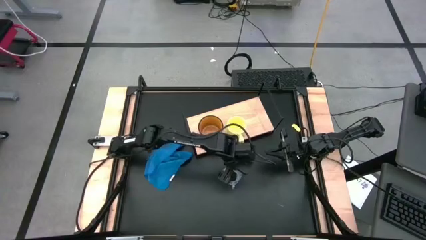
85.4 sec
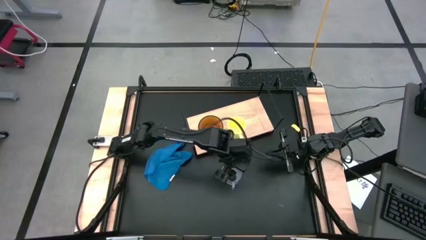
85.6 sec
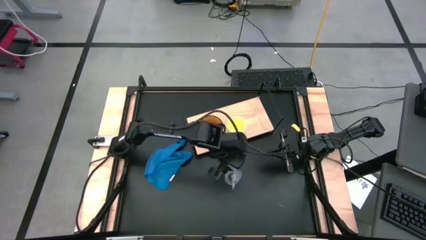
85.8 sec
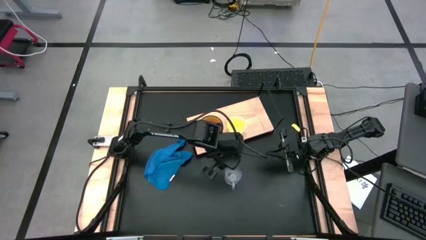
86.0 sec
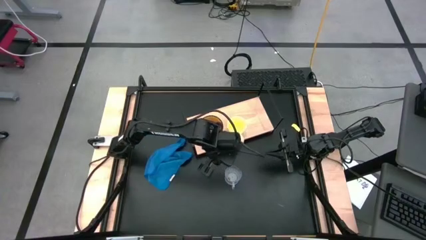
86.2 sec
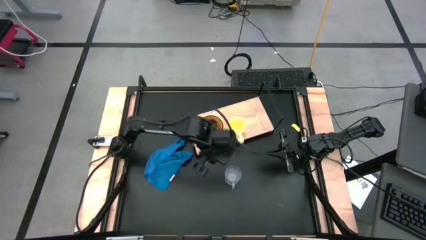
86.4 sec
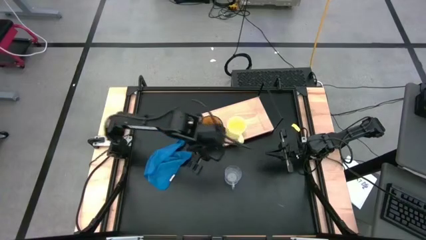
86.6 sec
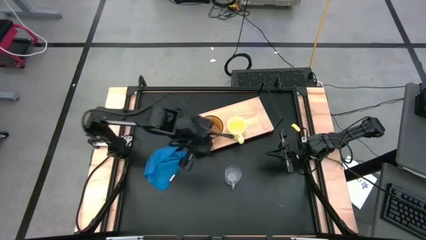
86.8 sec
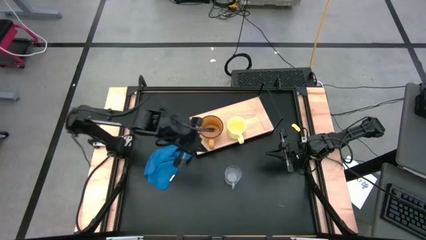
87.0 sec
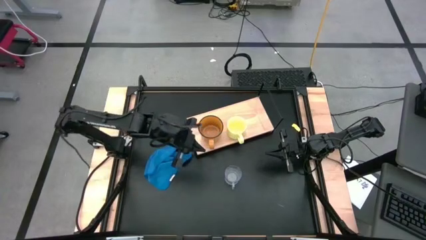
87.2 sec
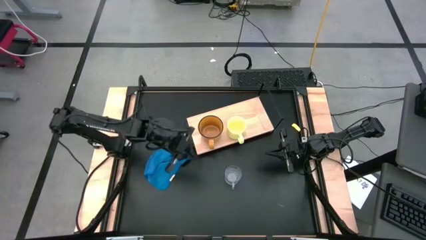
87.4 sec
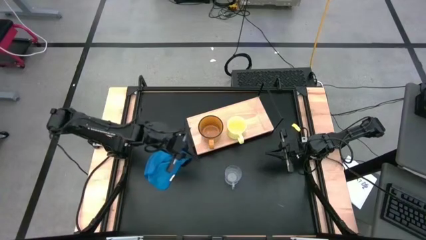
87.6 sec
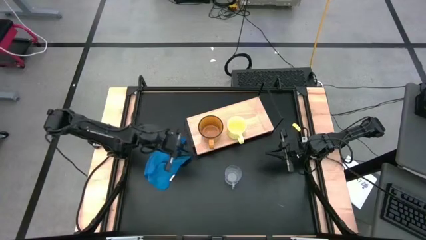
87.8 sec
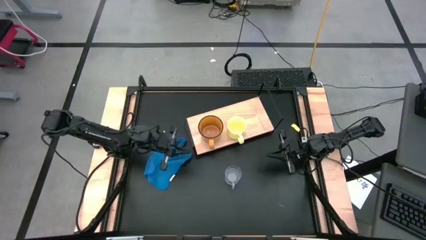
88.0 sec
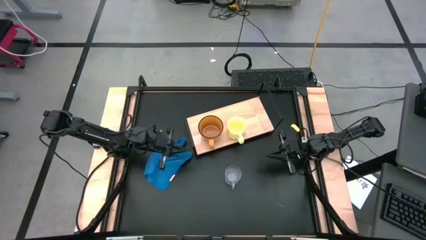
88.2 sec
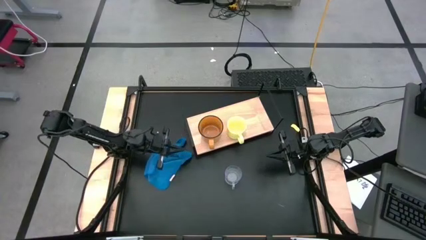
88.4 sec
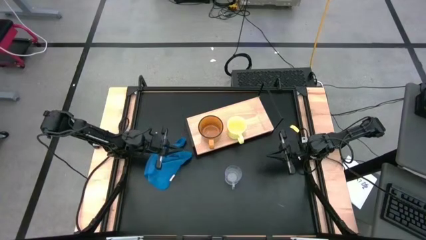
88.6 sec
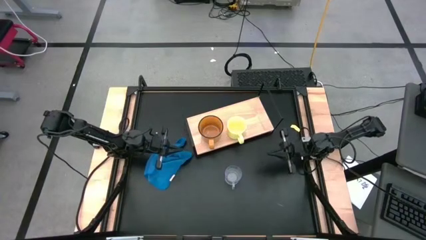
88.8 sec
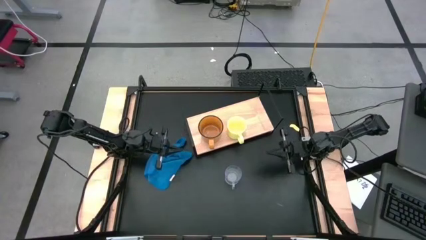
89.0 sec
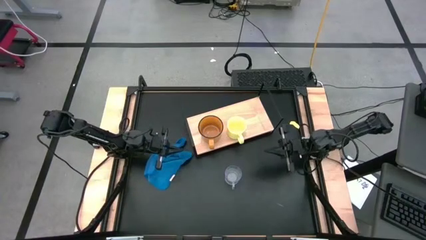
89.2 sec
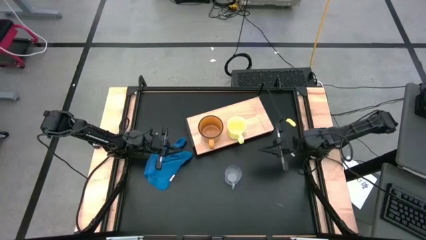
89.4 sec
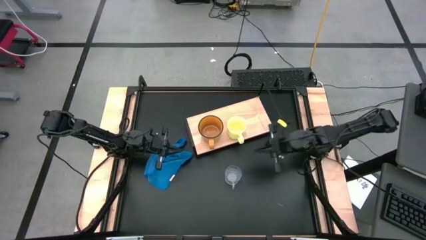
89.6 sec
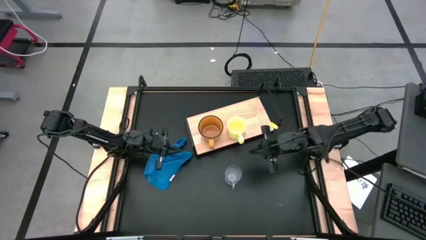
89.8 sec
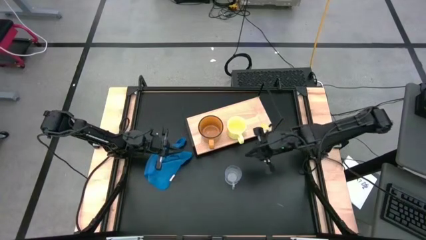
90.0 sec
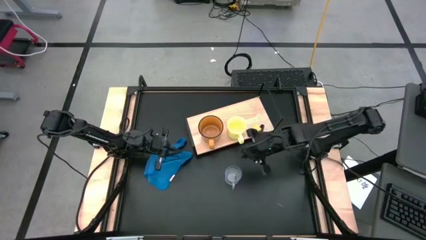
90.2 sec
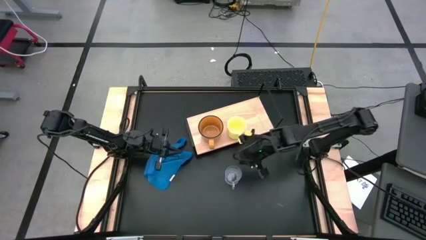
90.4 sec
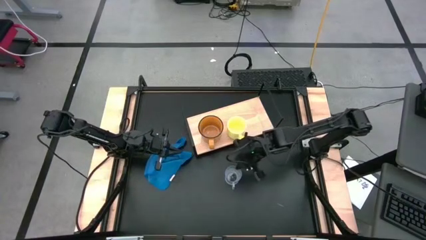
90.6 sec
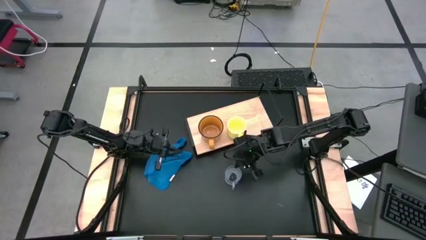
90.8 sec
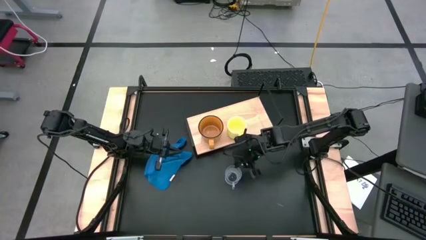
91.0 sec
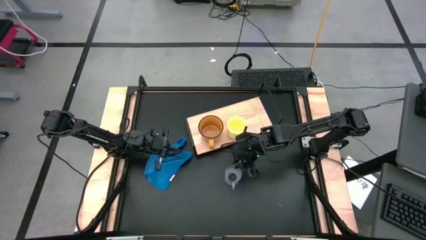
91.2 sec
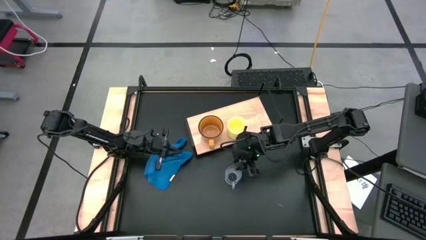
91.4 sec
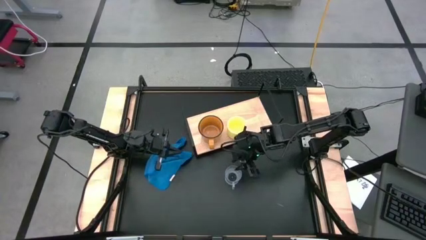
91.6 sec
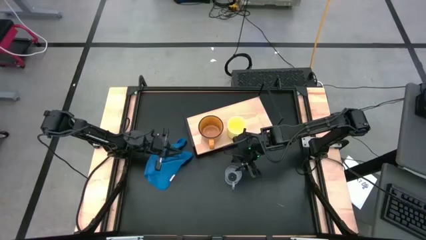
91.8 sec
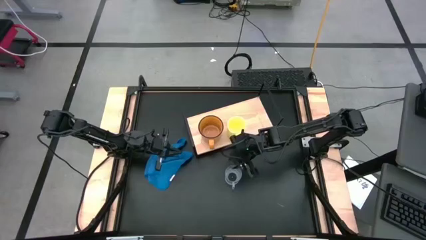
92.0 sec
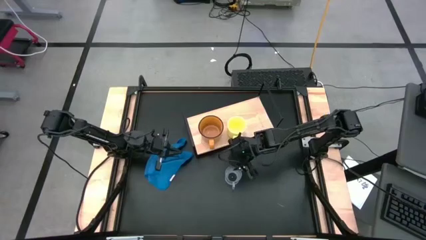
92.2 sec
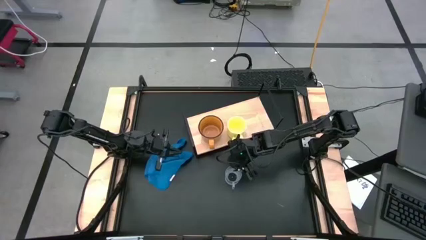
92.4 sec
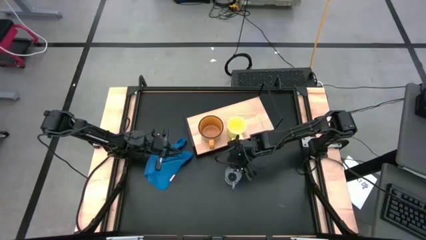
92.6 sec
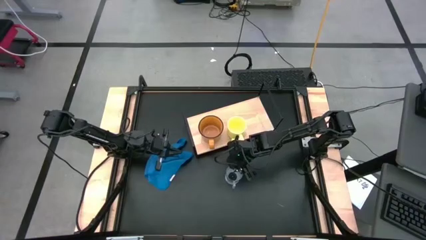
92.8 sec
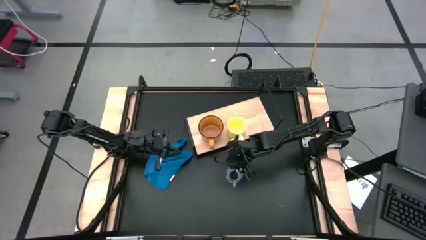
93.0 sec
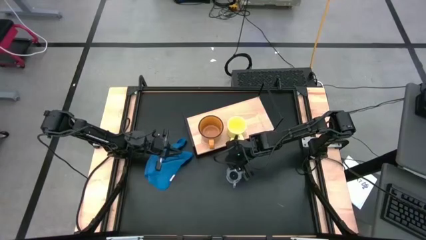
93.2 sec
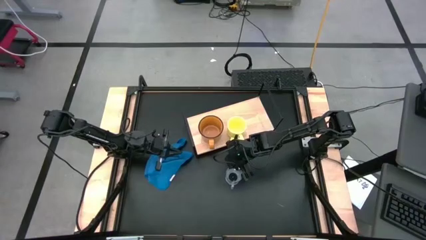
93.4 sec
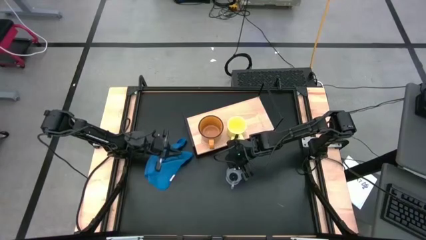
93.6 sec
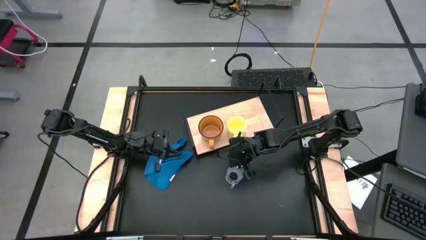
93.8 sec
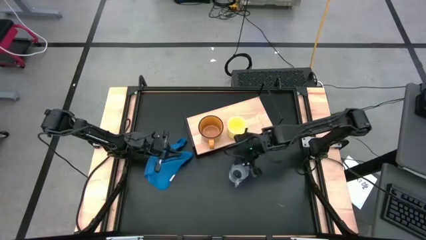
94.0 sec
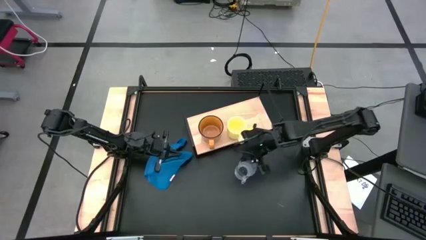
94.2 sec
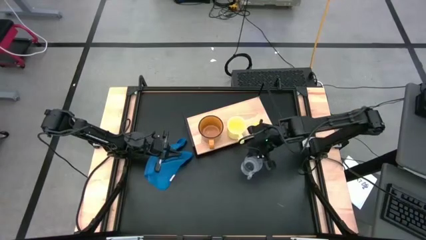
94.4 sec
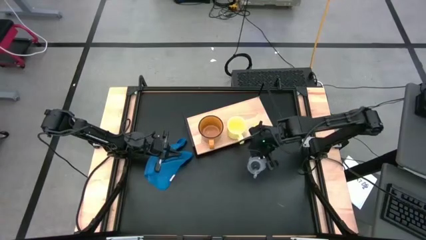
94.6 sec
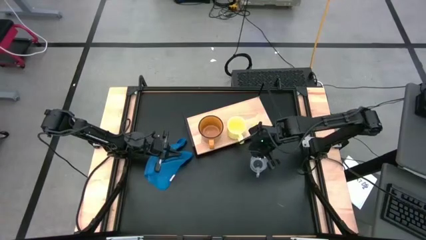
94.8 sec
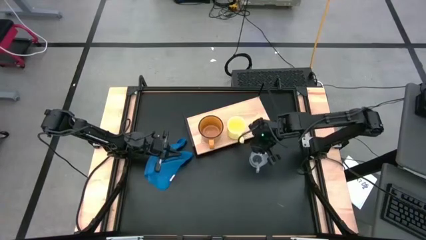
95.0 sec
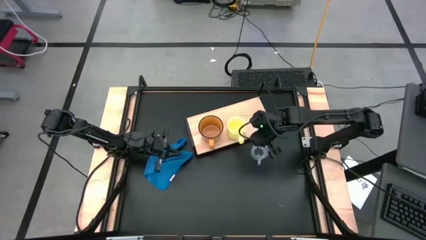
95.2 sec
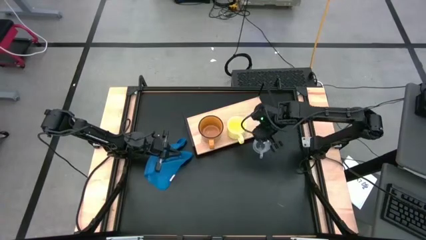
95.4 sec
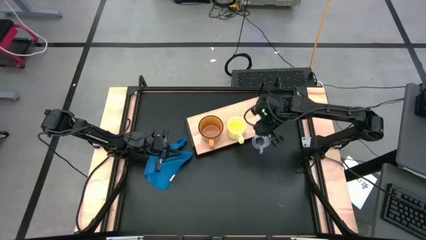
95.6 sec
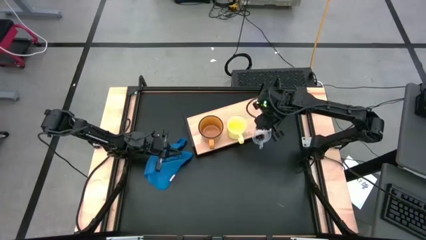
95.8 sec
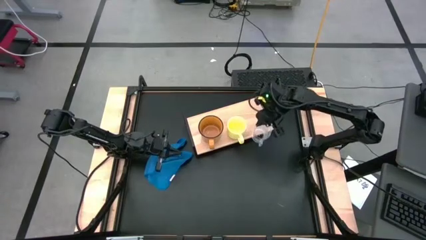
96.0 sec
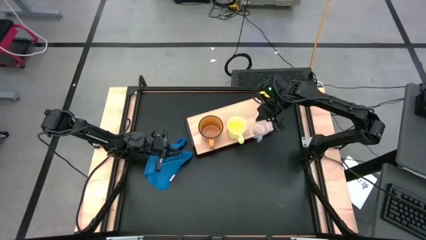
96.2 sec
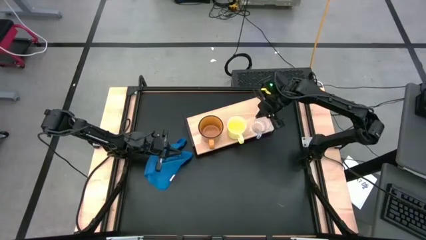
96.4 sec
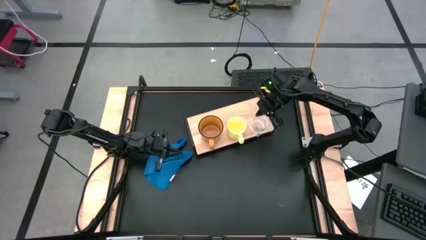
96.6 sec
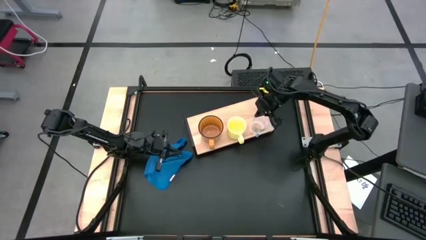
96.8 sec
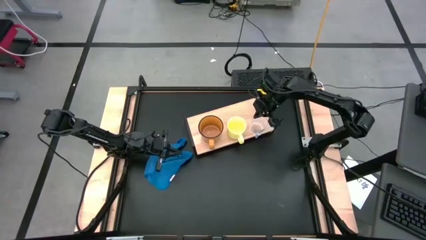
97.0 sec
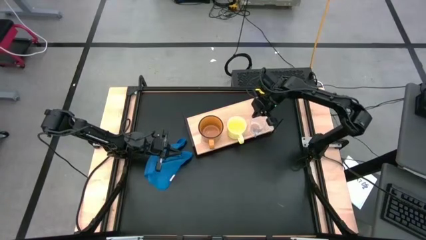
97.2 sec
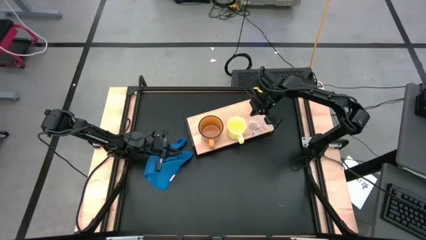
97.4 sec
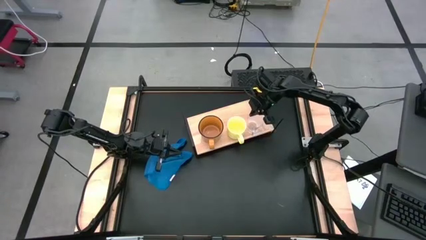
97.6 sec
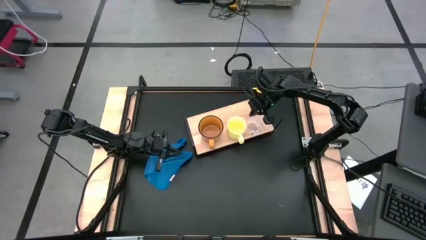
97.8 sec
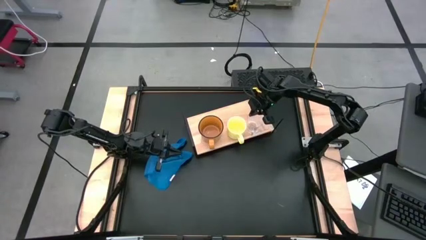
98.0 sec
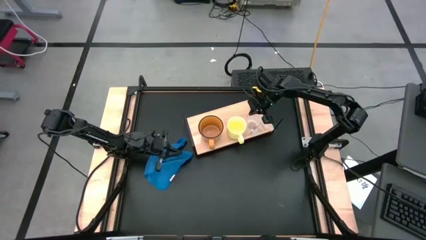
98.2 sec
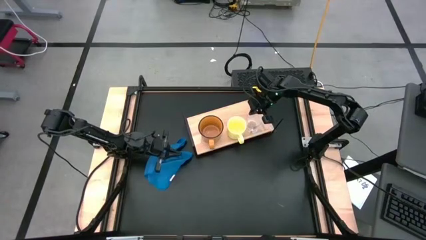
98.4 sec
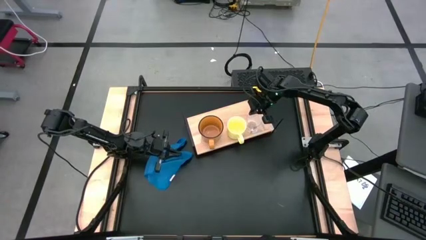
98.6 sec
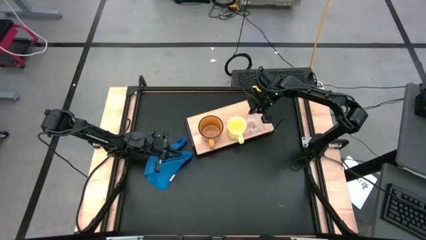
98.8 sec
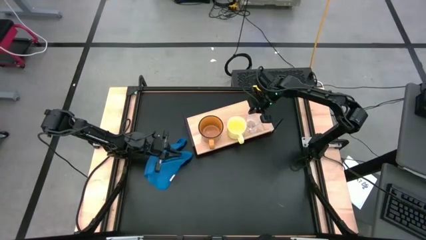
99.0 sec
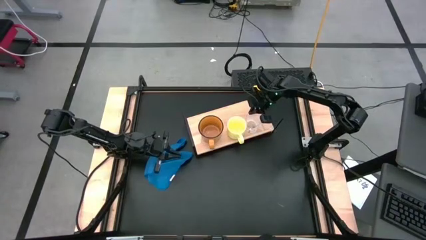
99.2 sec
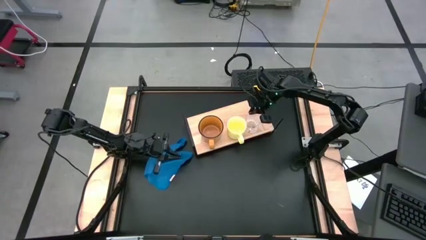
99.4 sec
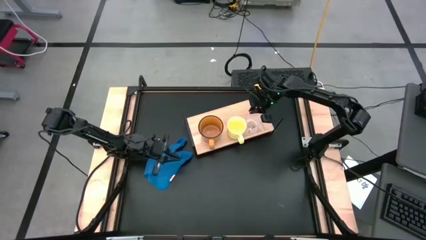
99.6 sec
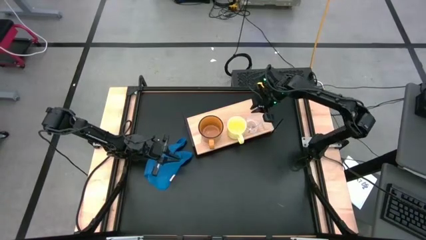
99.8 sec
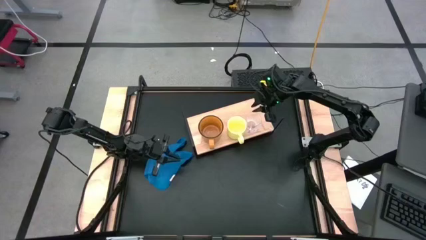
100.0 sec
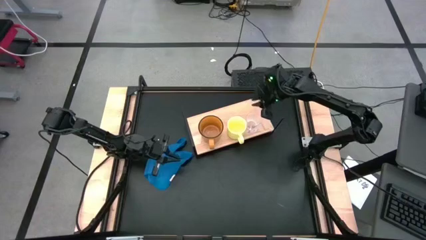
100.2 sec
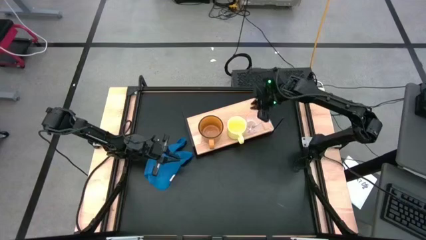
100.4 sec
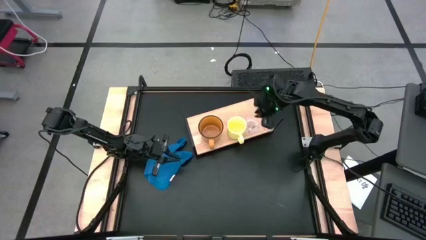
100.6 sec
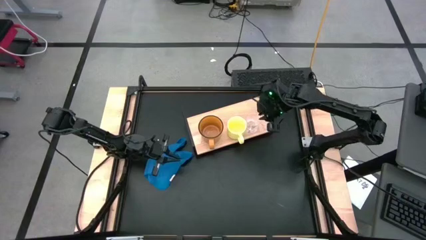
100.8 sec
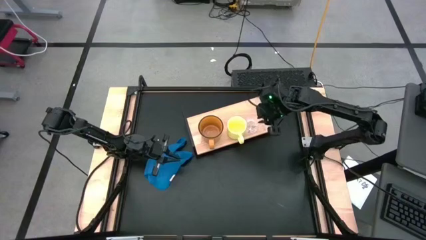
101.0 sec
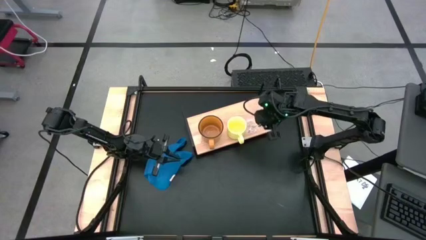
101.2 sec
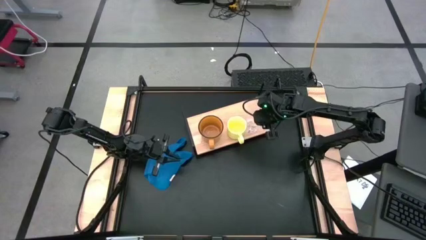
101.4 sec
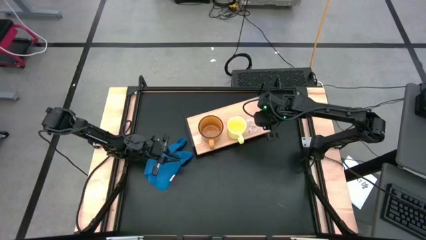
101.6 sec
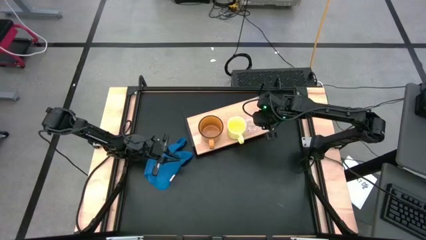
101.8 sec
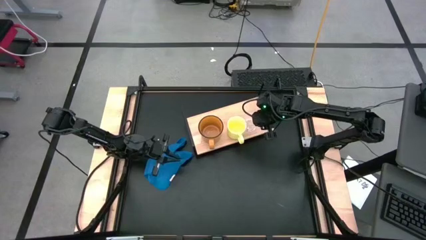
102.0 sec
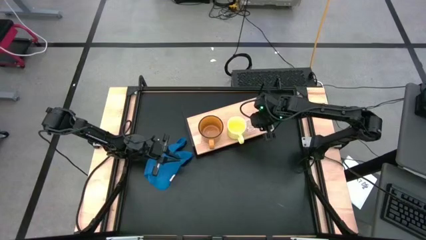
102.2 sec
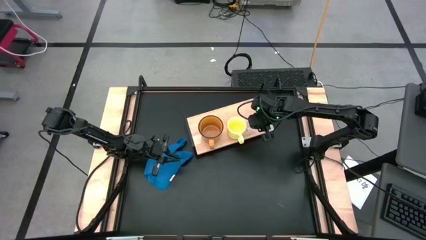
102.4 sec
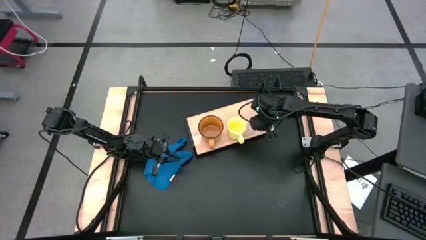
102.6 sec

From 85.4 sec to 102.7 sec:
Task: Stack small to large cups/mugs on shelf
Put the transparent mug on the shelf aligned with the yellow mug
